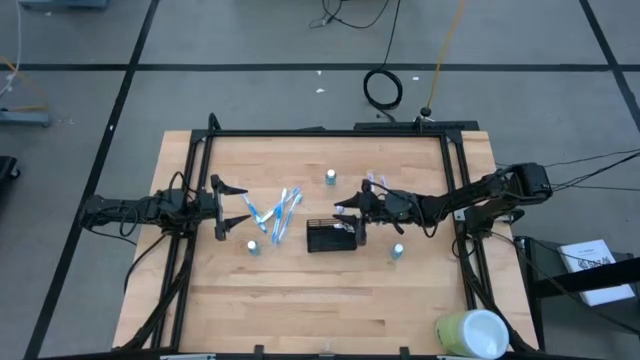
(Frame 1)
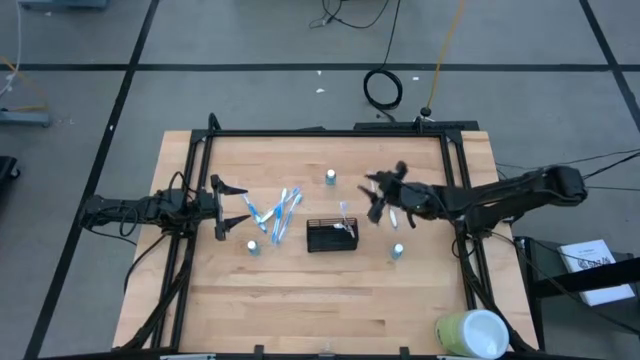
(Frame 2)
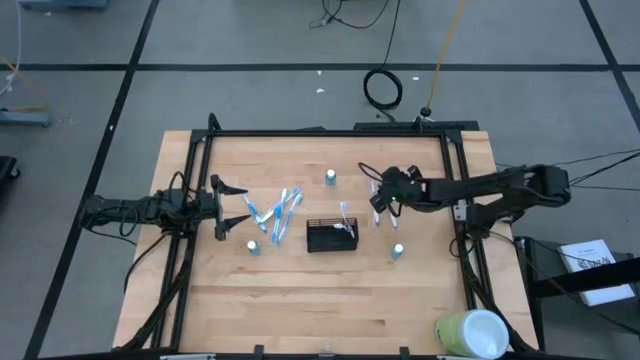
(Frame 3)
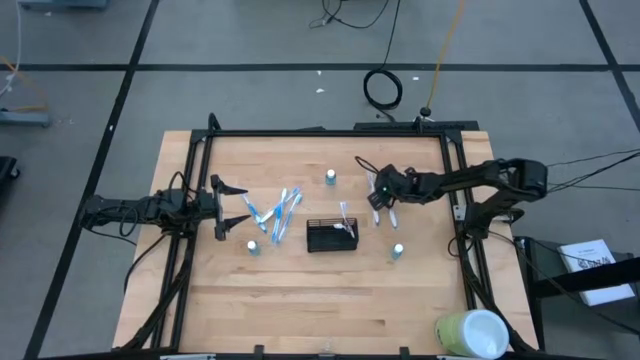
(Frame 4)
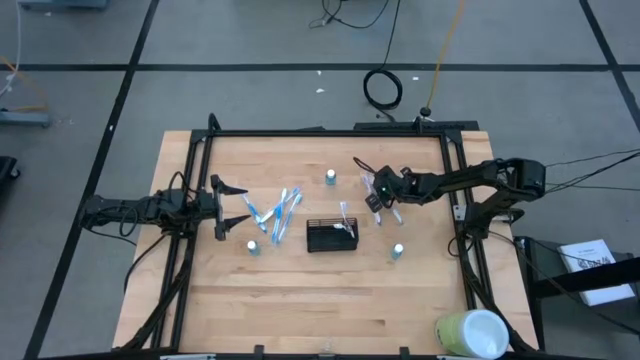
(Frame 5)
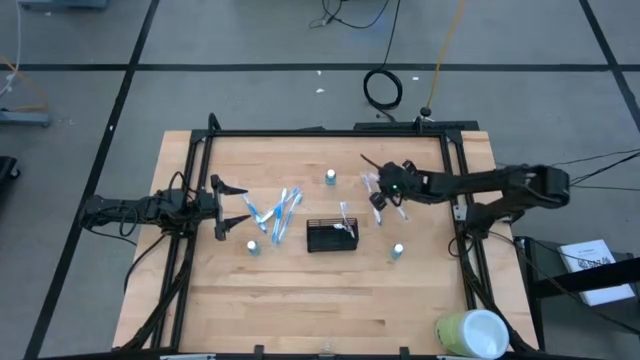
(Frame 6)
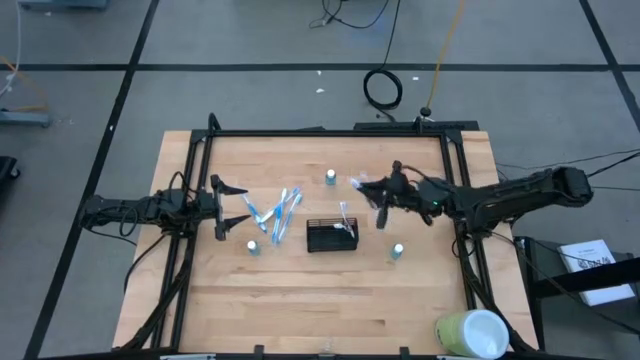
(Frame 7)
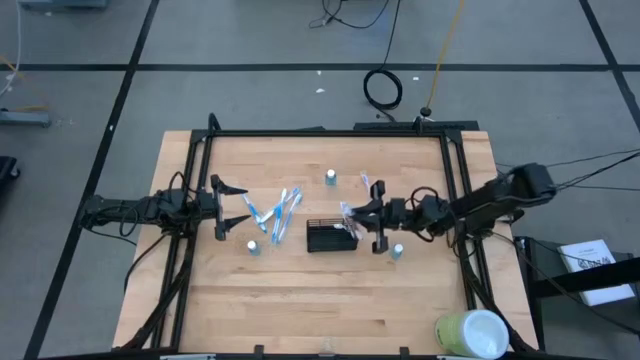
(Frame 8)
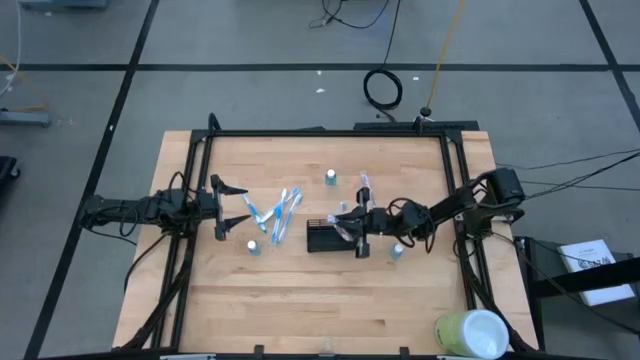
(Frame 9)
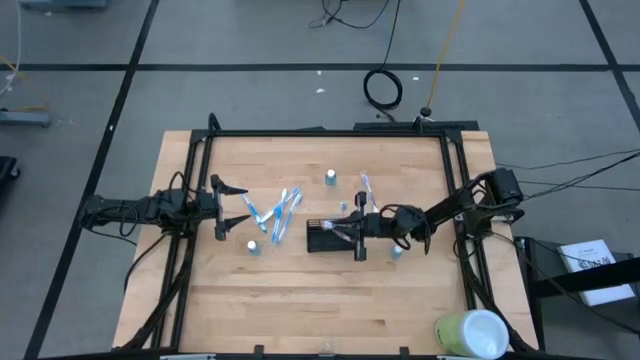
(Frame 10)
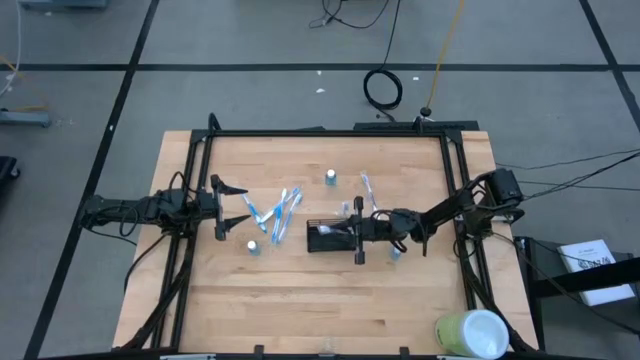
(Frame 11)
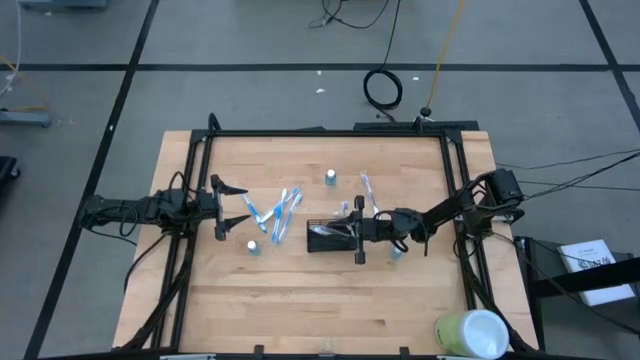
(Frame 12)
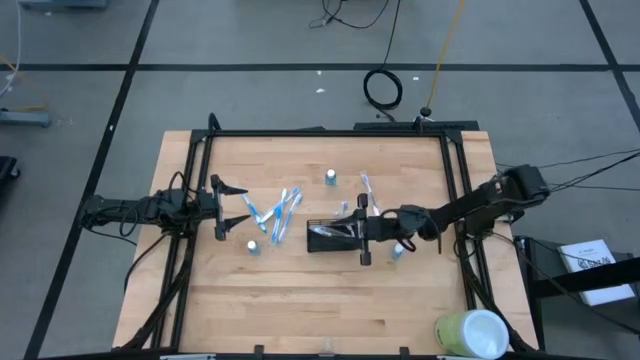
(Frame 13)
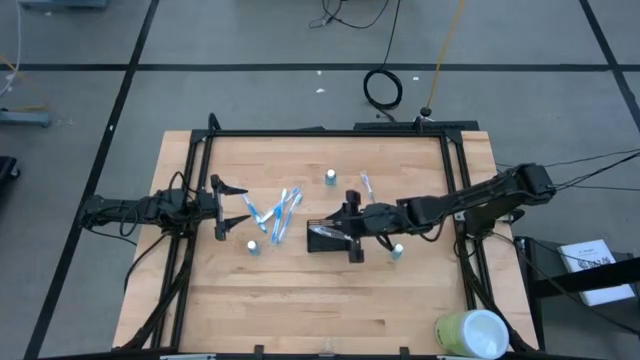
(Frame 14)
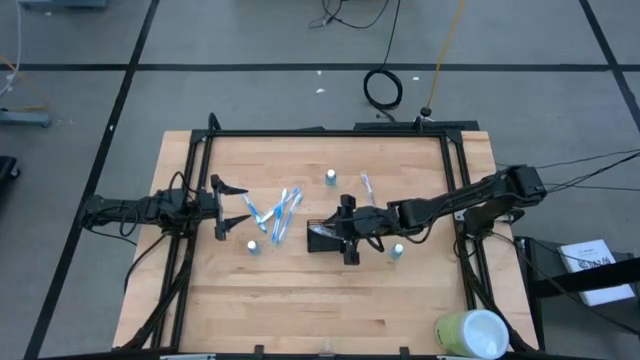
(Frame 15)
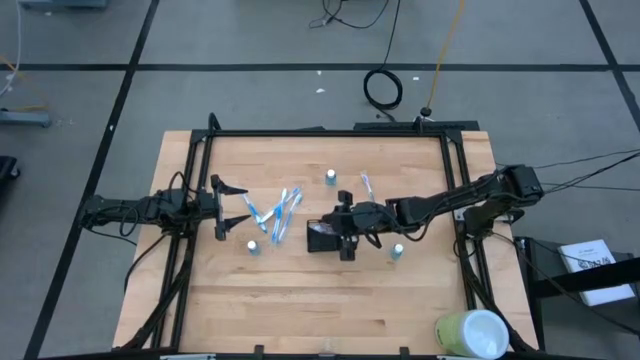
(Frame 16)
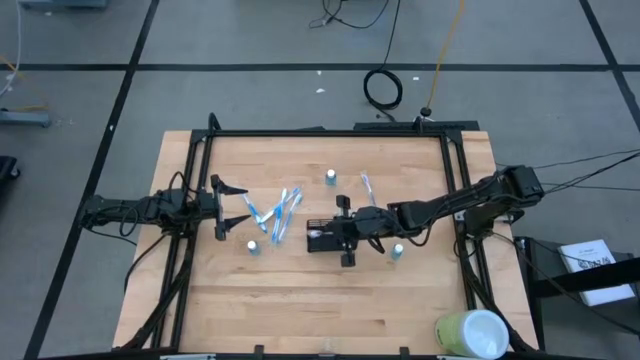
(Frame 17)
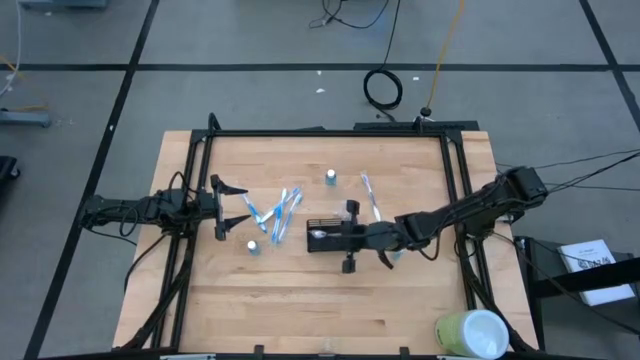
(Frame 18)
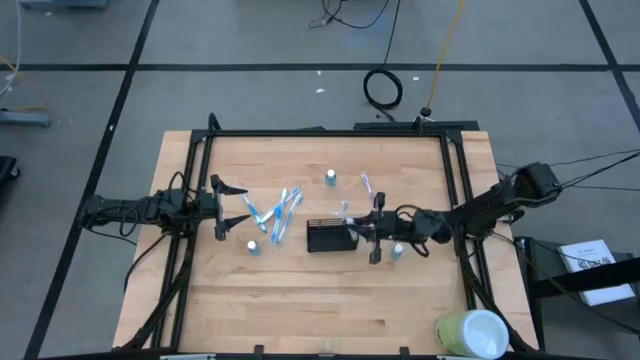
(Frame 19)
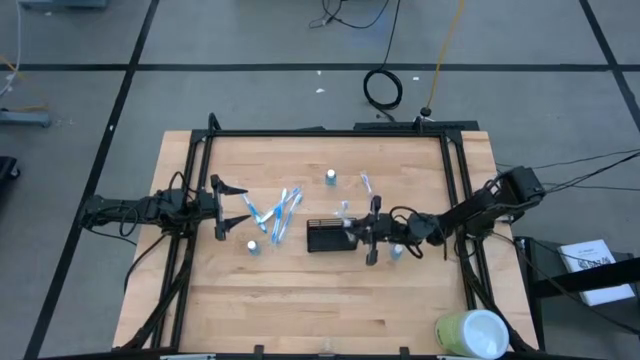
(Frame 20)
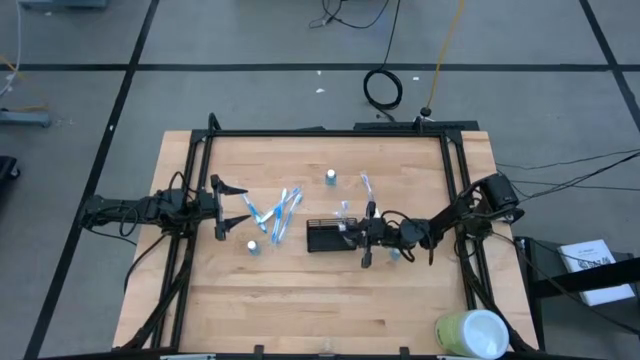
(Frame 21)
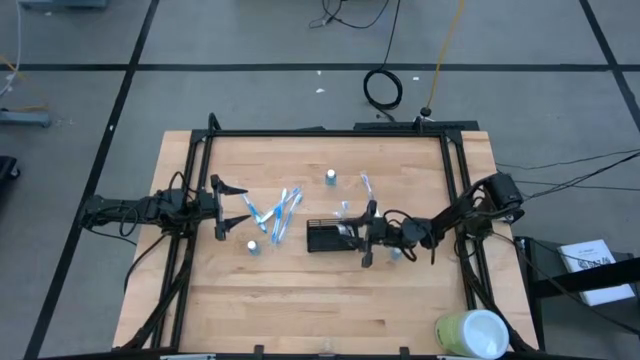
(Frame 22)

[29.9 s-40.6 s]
Task: Pick & Place toothbrushing station
Put the purple toothbrush into the right section of the wire organizer

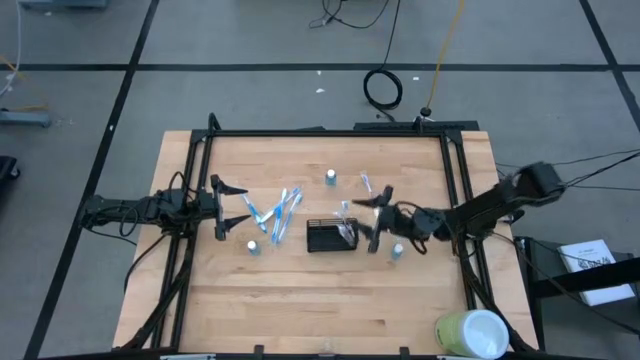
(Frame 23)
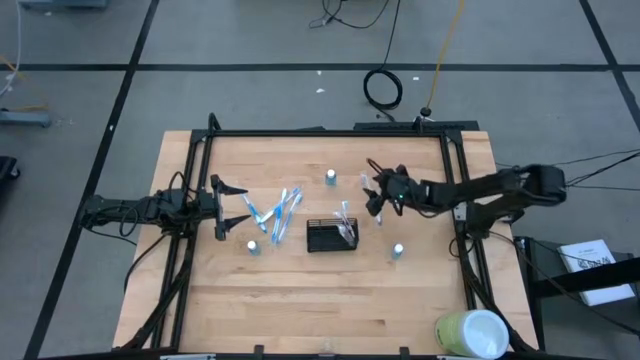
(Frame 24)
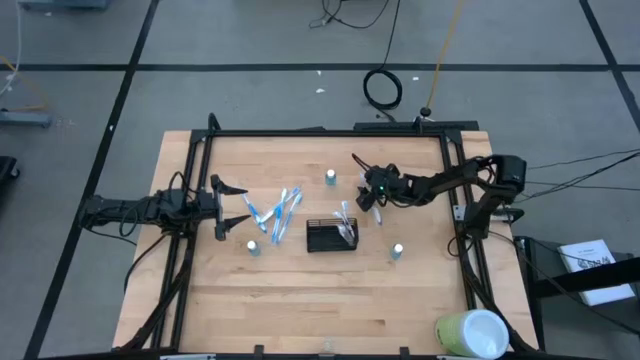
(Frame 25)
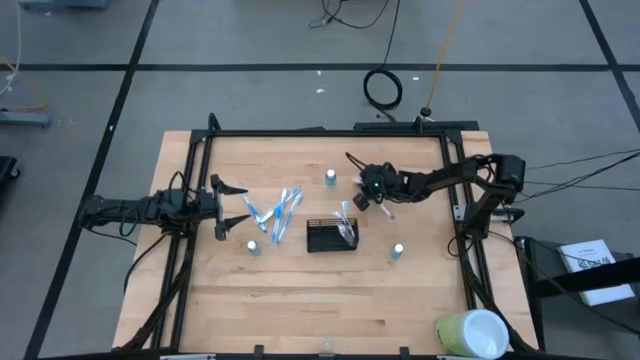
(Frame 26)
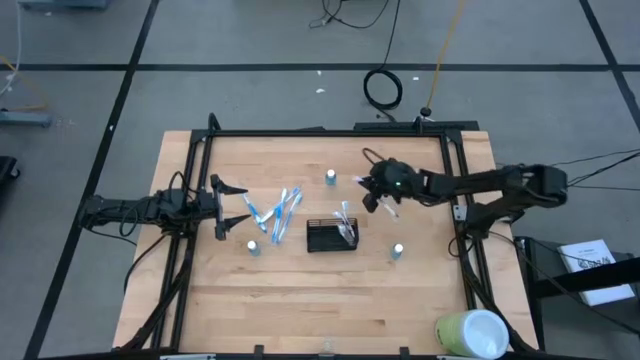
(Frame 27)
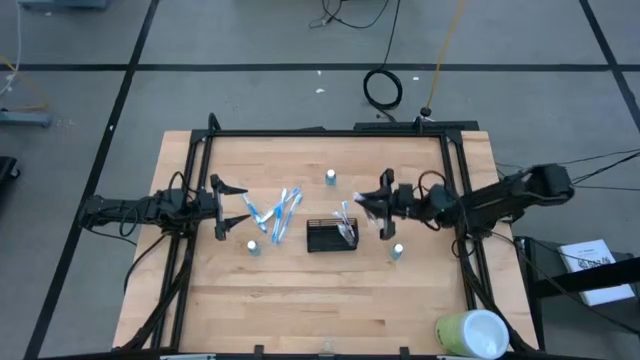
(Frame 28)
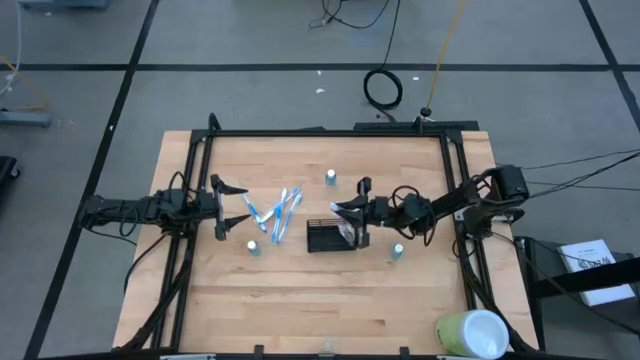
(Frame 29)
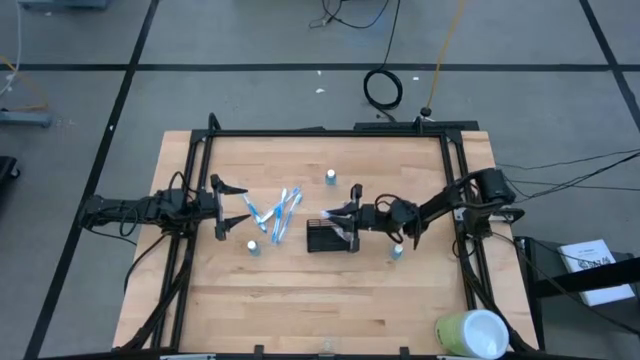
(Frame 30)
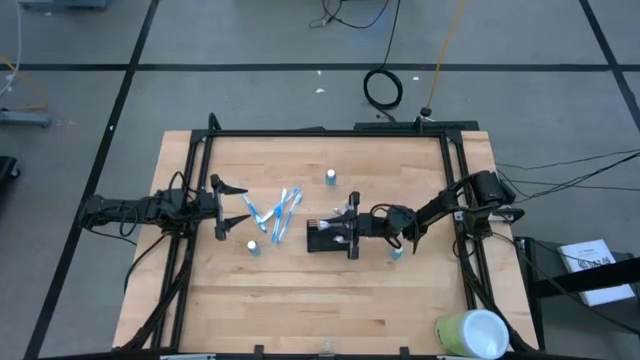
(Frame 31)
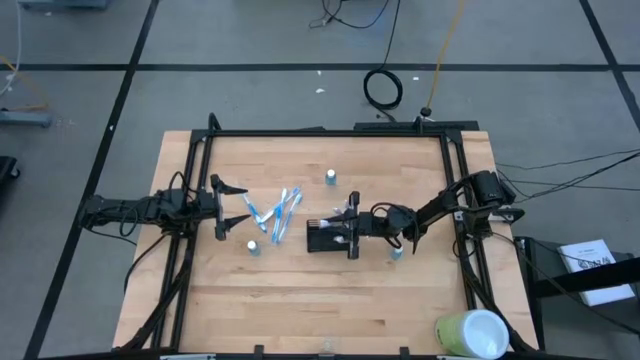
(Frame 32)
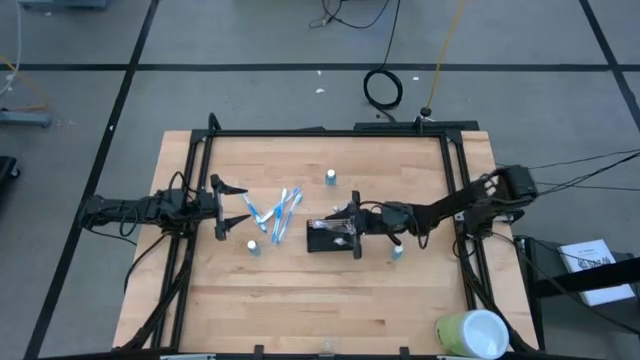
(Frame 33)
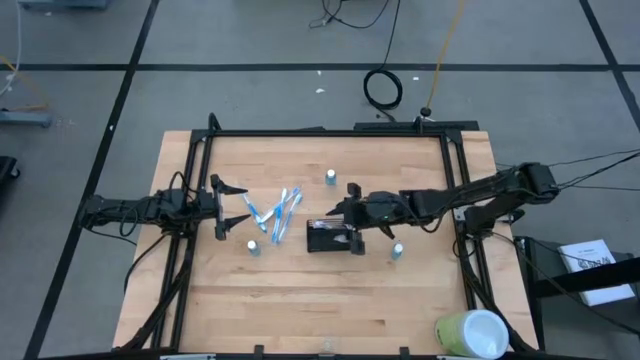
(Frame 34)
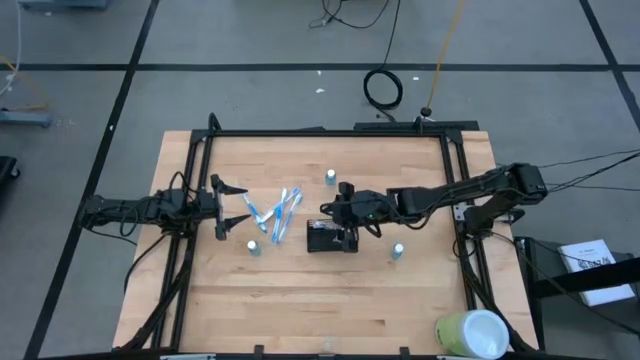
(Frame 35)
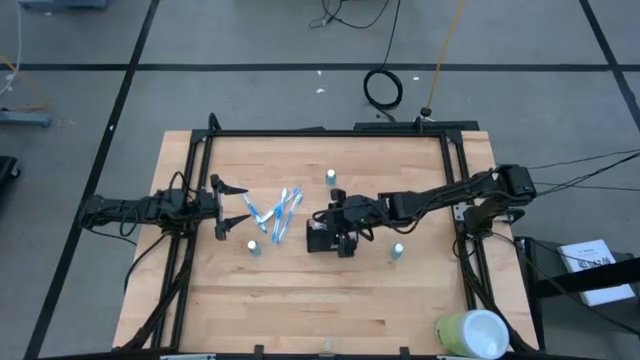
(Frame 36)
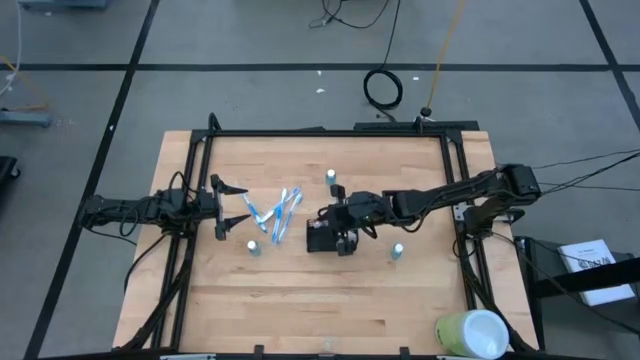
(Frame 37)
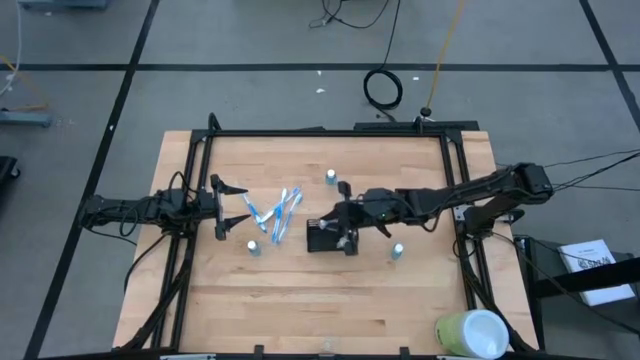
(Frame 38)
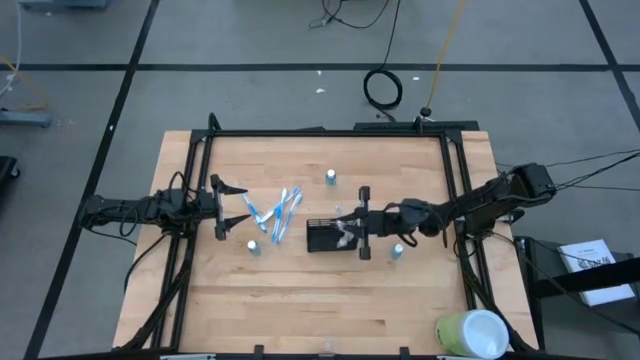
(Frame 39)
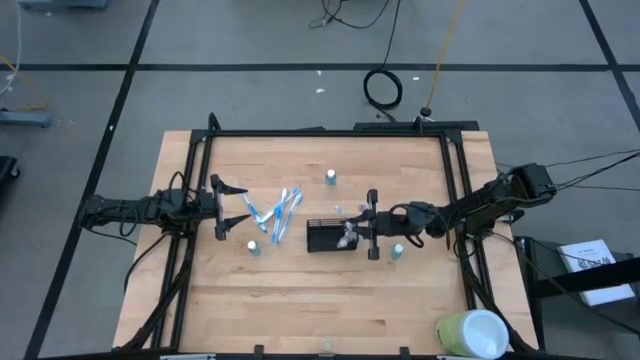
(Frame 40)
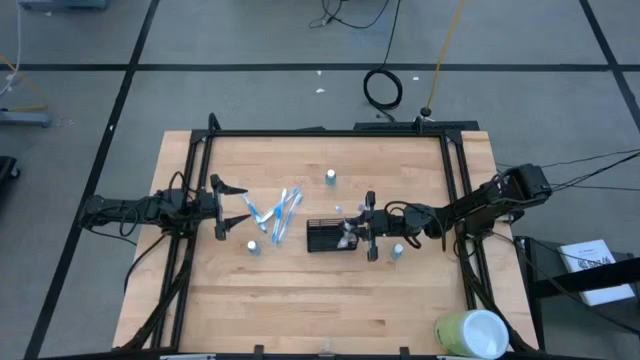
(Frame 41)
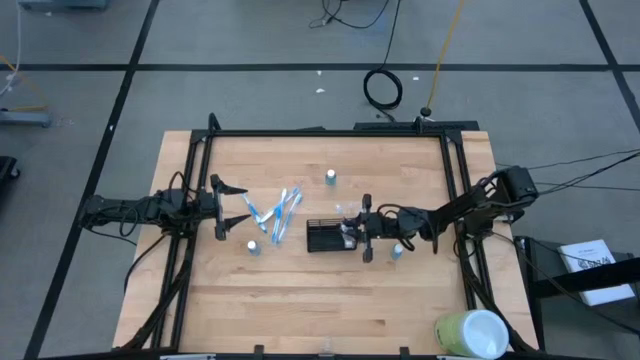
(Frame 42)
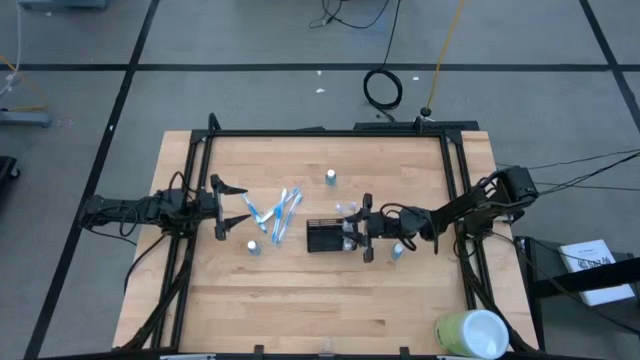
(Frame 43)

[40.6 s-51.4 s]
Put the purple toothbrush into the right section of the wire organizer

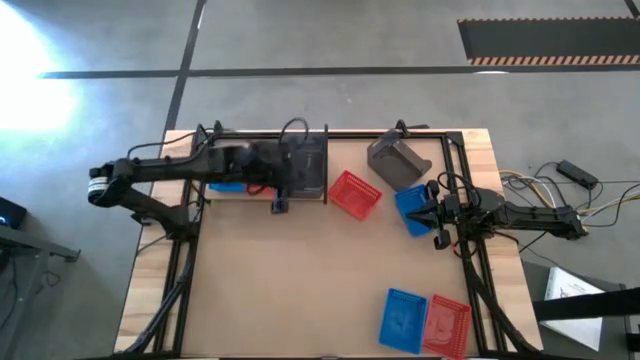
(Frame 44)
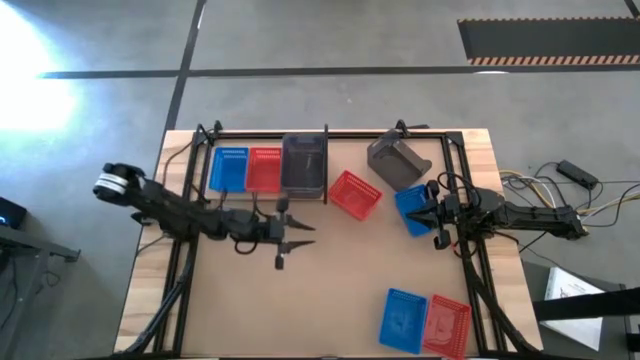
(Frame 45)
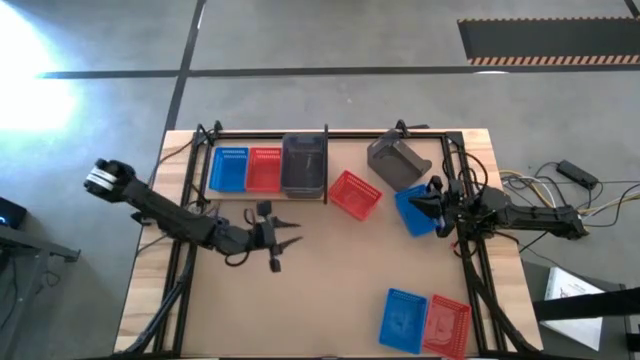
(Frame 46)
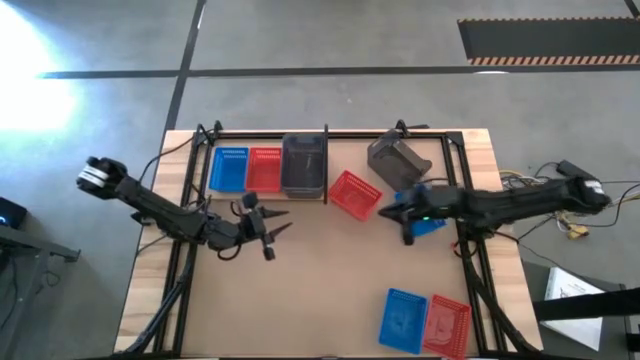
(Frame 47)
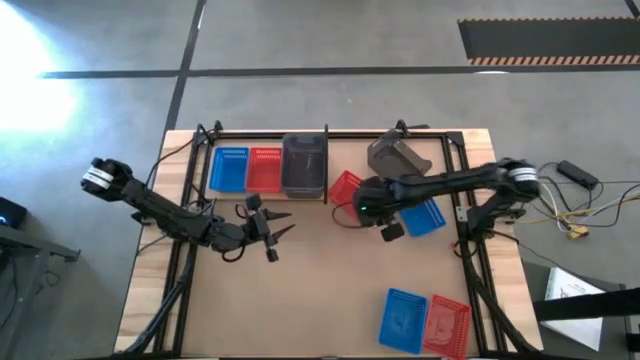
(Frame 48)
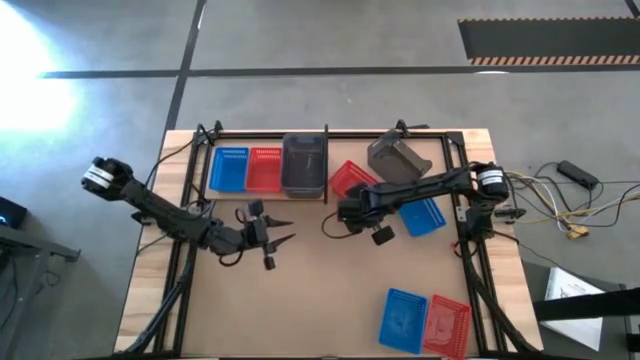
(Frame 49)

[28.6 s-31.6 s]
Task: Stack baskets on shelf by color
Stack the top red bin on the red bin on the shelf
